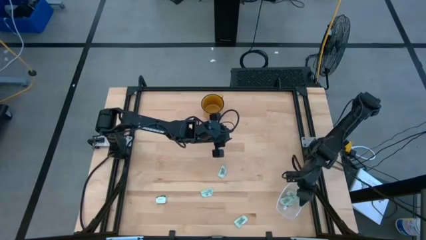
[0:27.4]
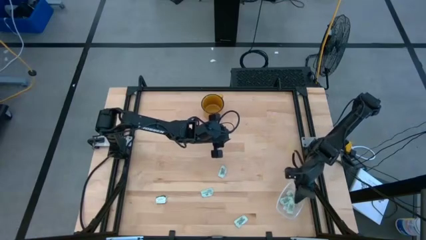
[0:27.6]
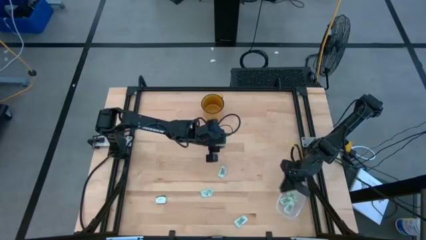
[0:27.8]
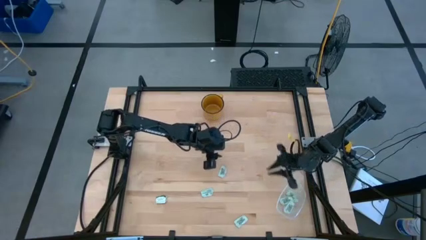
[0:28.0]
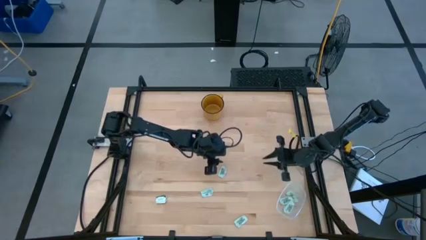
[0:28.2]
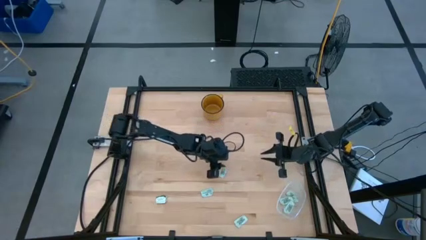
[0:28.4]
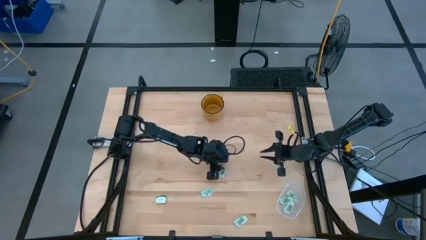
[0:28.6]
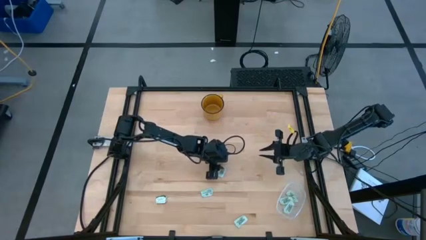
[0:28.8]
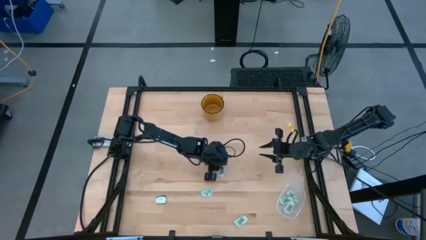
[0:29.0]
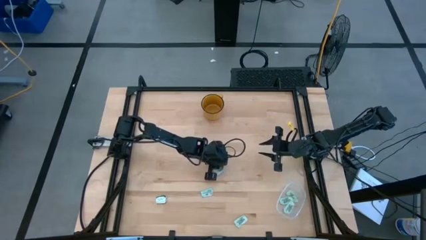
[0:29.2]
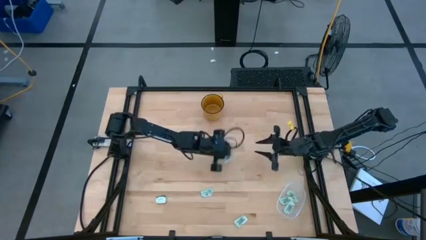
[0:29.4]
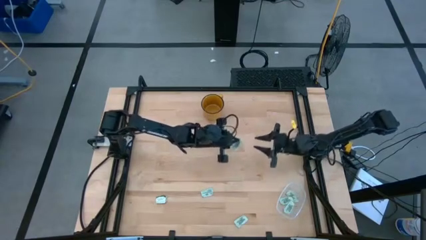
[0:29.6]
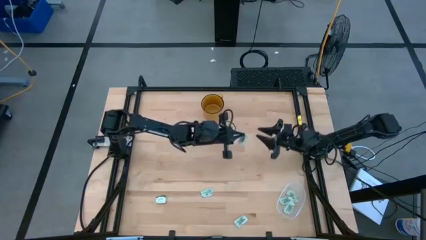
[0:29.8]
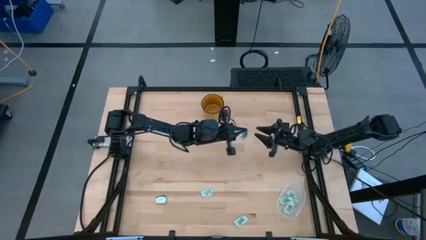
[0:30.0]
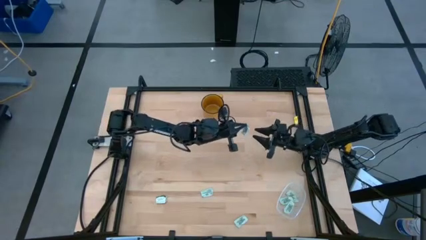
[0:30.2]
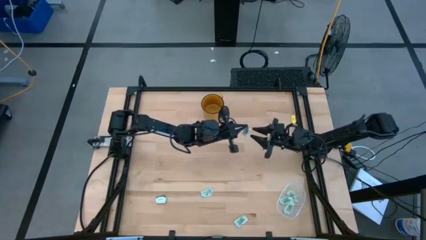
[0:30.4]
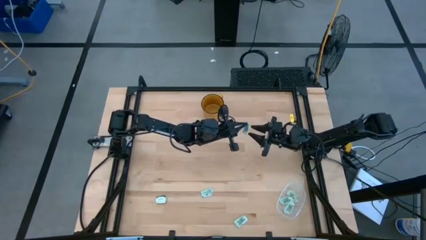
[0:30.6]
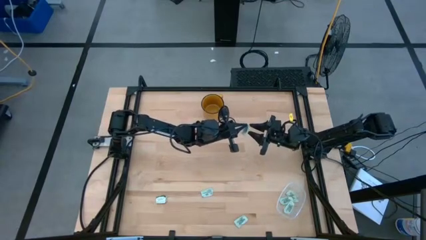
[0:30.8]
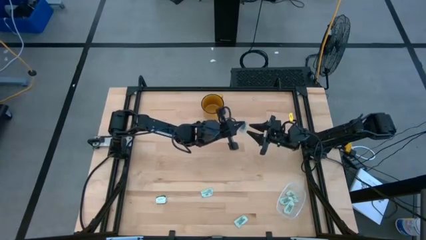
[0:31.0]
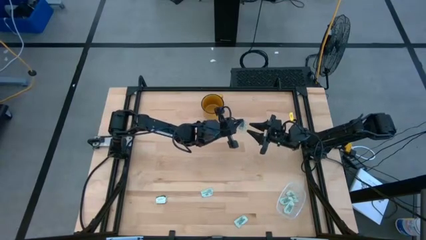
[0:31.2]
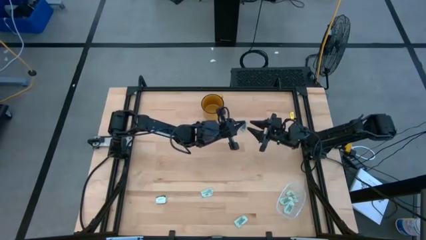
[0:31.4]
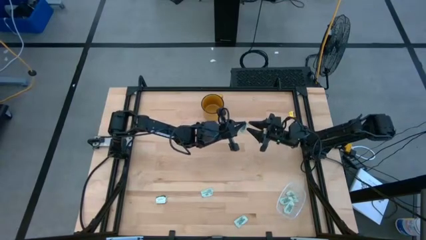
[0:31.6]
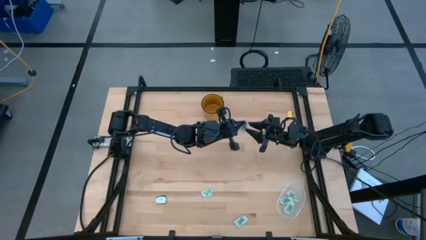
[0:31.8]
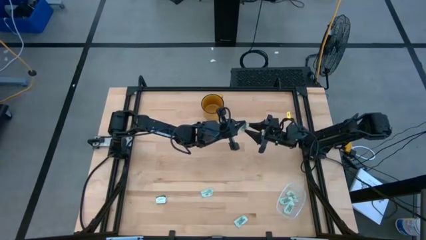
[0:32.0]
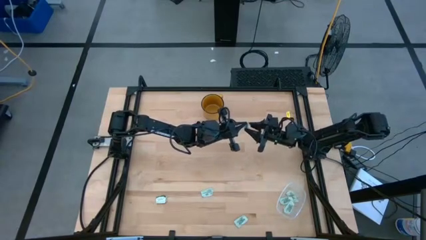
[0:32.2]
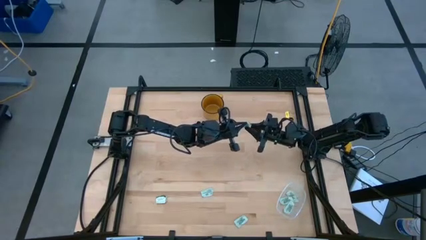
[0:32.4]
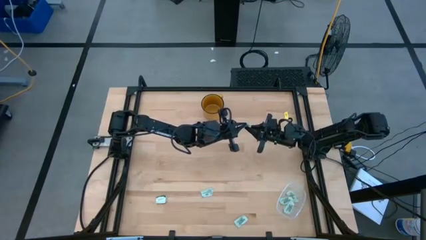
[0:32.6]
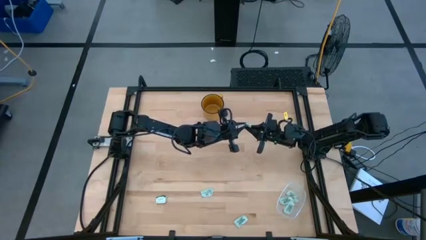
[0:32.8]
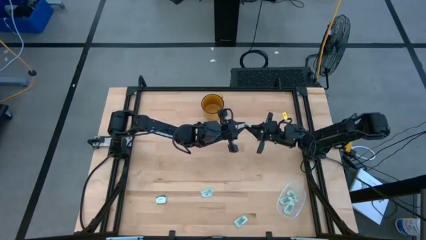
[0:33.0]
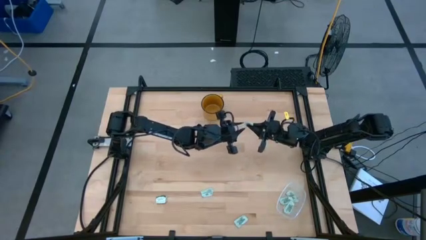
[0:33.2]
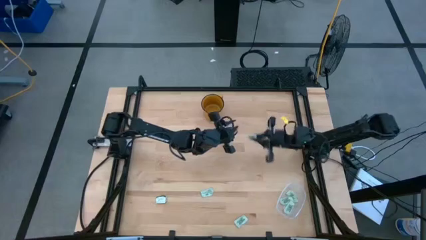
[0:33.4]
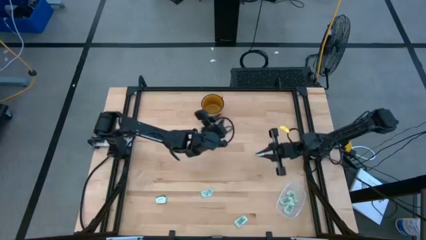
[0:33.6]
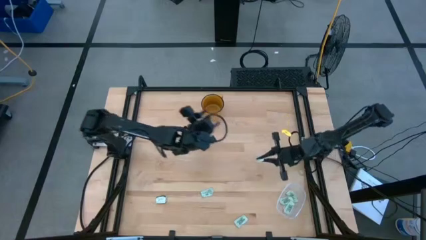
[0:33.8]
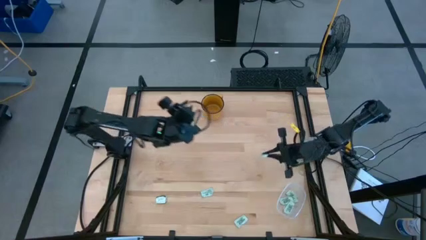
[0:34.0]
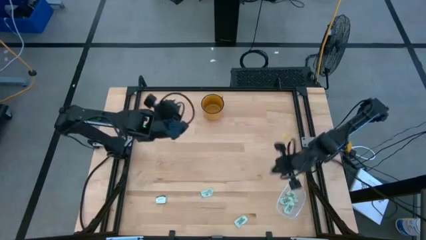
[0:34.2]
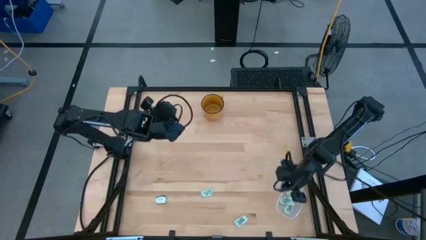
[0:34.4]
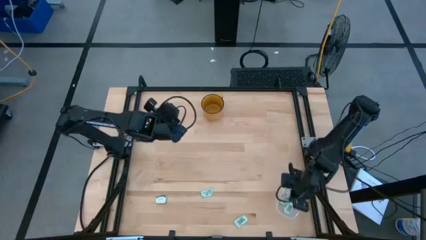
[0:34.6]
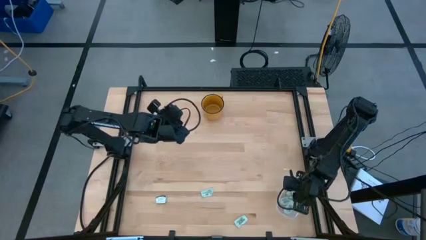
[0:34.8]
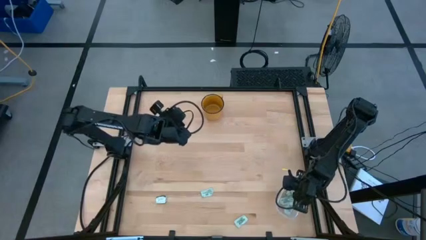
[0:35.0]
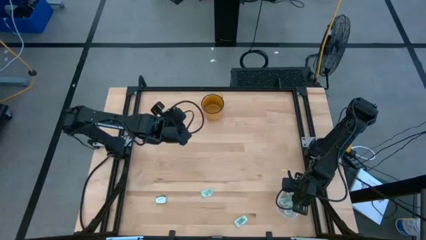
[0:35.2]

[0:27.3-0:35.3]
Task: Pick and place Stevia / Truvia into bins
Put the stevia packet into the transparent bin

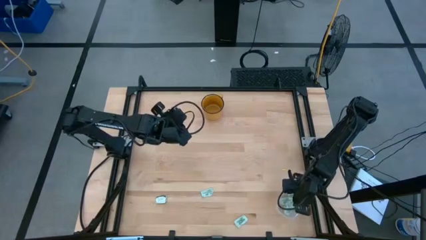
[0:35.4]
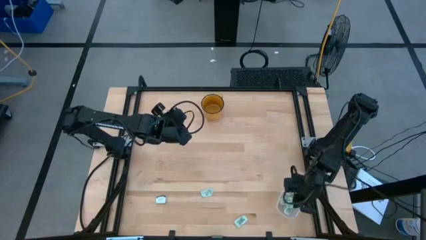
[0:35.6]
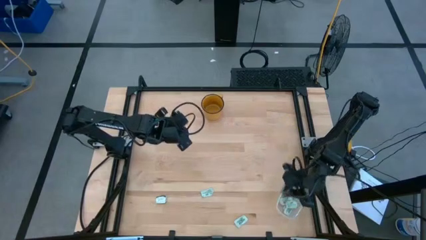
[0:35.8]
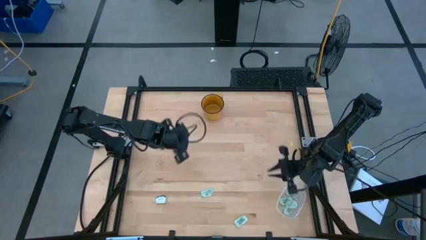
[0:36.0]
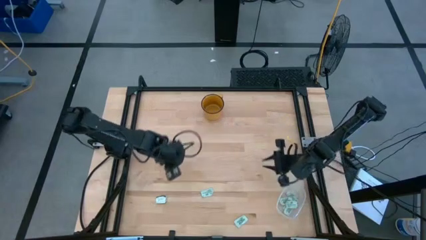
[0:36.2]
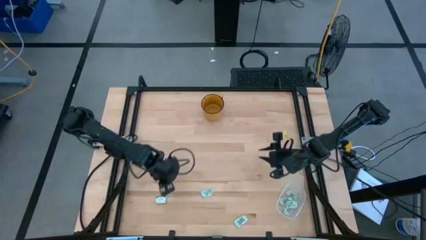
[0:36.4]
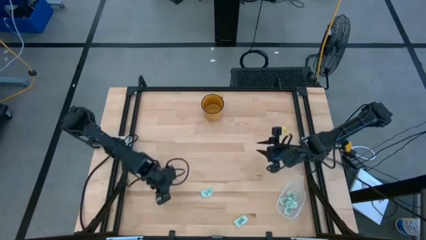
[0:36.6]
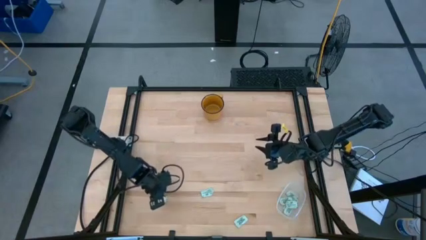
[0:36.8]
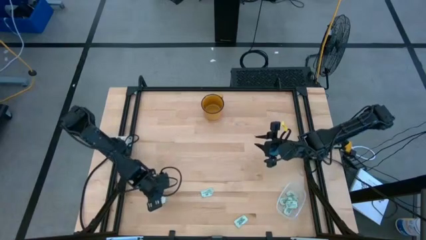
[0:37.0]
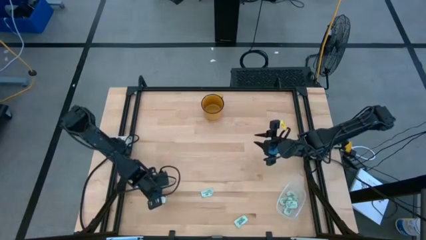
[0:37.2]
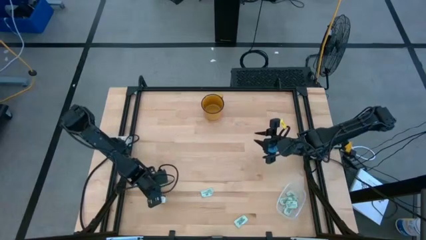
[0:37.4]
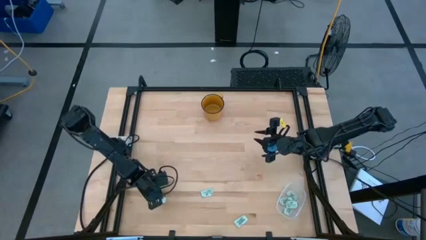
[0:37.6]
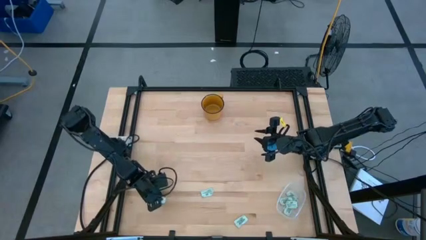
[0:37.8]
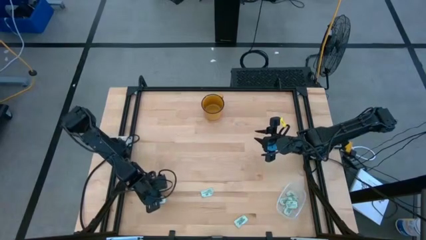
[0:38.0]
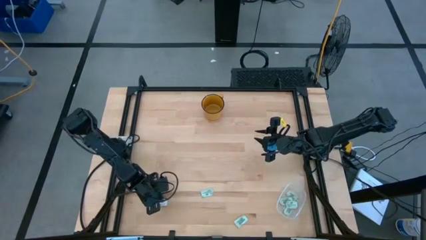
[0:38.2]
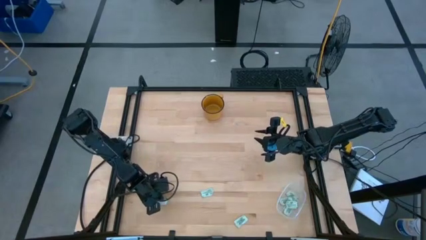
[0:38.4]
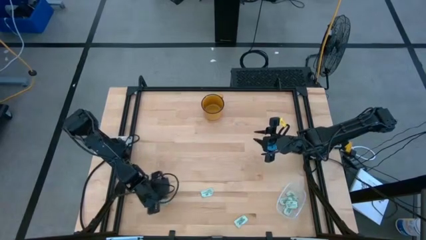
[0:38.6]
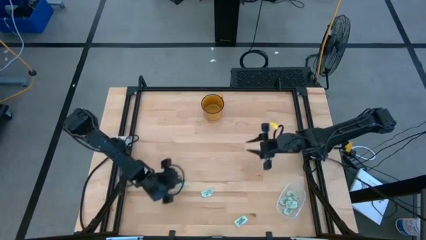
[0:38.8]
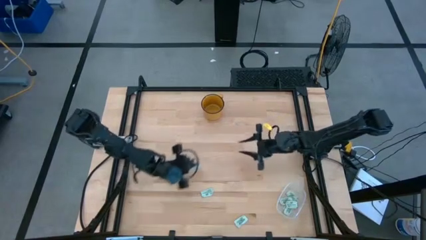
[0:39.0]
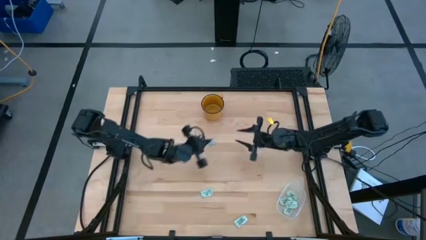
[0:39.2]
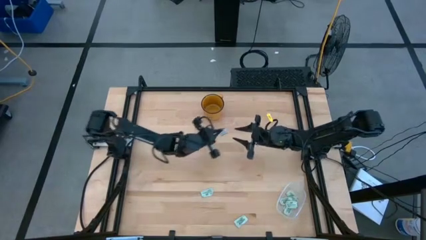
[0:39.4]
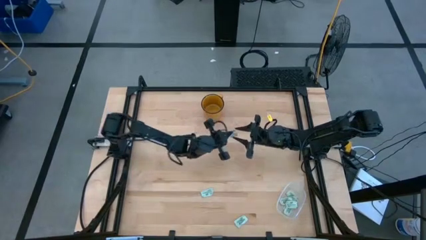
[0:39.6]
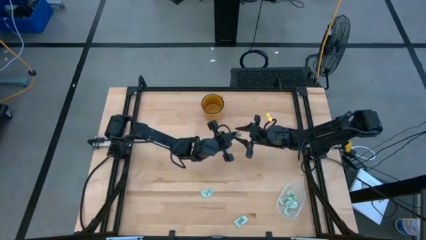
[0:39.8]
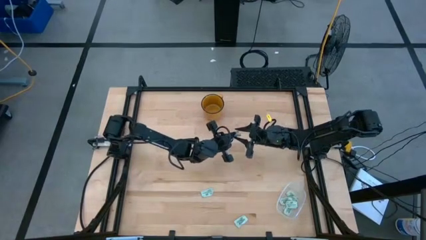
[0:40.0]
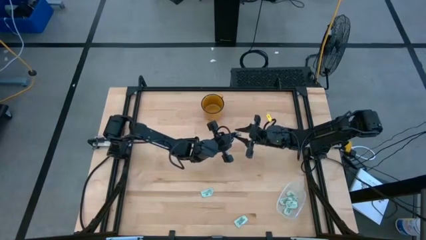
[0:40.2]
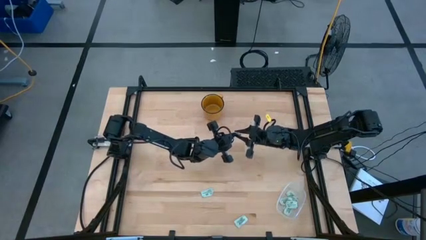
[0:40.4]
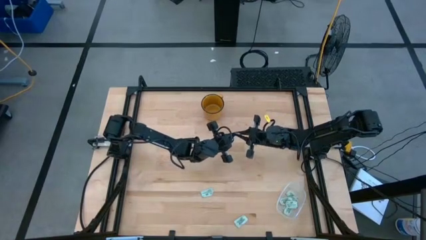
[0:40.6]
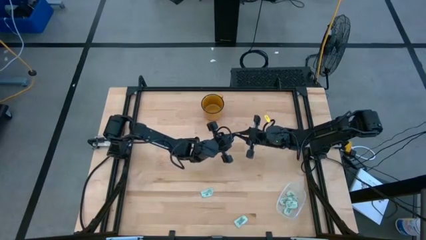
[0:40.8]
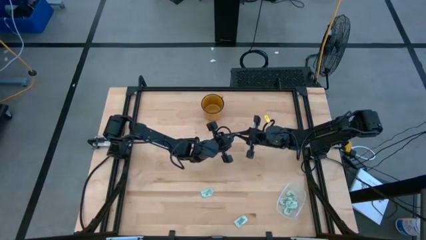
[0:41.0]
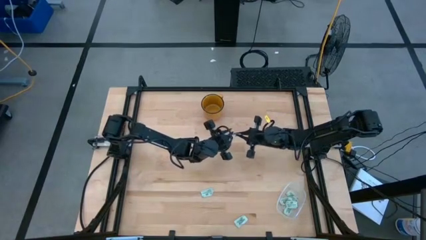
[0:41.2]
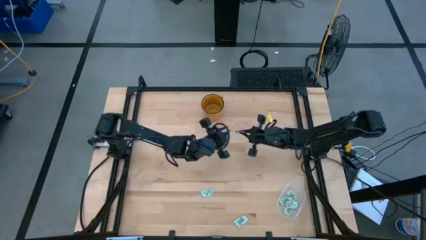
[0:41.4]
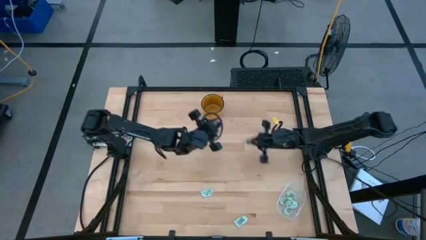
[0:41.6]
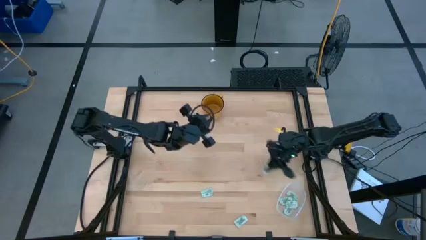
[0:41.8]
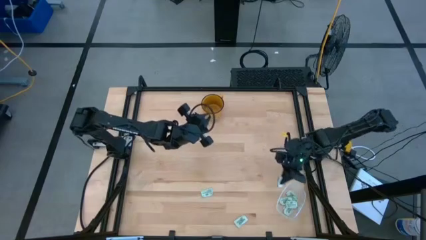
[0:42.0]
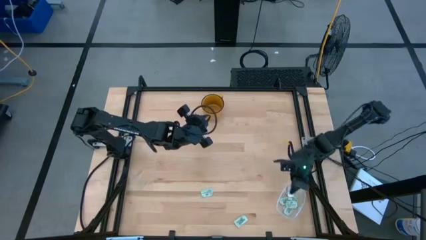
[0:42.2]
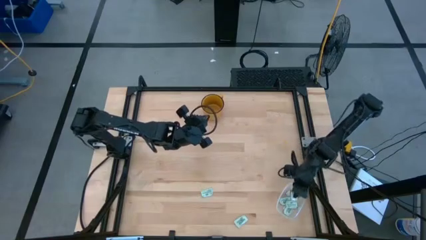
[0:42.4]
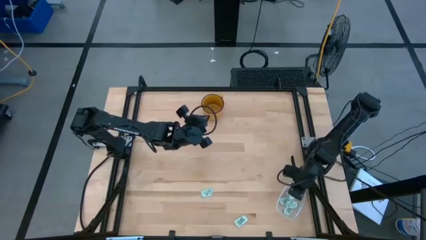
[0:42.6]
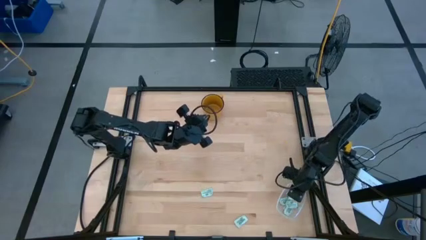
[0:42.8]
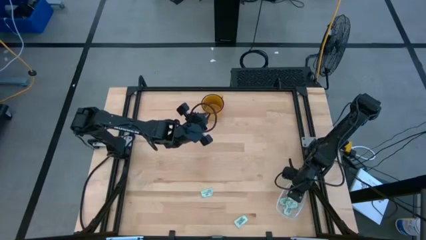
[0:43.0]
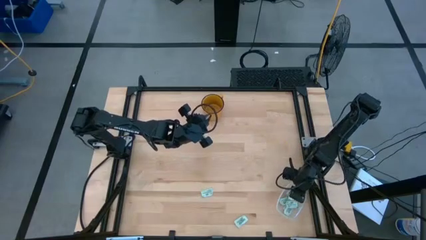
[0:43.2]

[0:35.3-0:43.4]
Put the stevia packet into the transparent bin

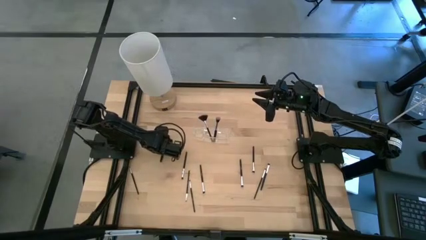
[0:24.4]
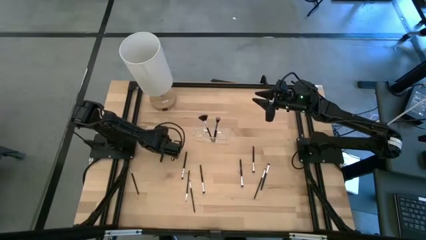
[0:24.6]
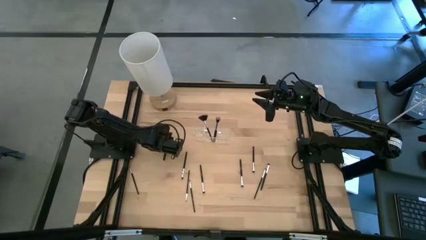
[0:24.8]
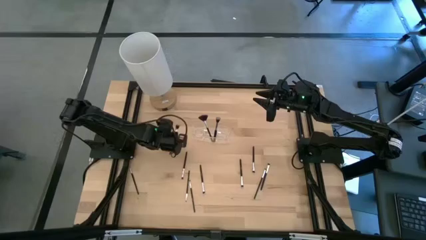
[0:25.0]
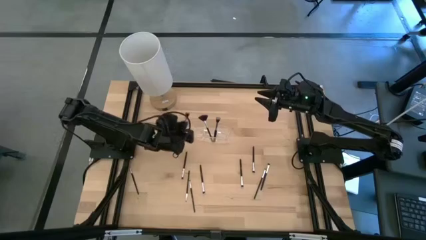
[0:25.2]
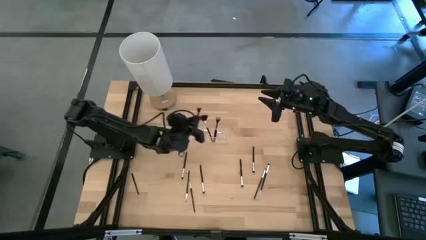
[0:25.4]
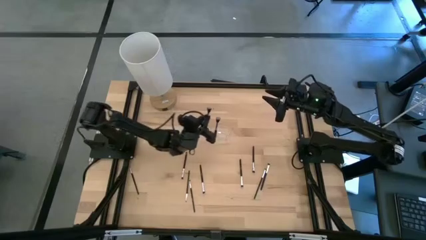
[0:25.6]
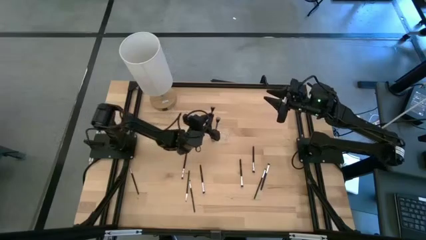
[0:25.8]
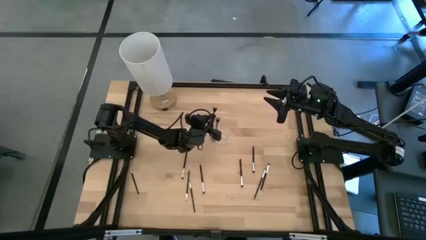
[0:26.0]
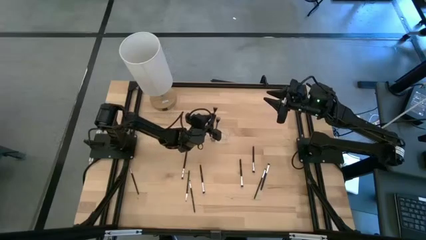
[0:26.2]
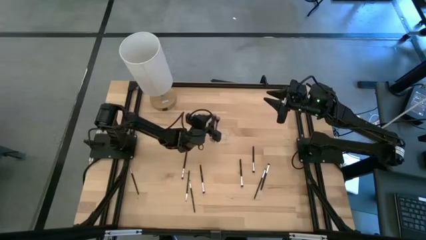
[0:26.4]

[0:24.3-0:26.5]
Task: Put items in baskets/containers
Put the black powder brush into the transparent organizer
